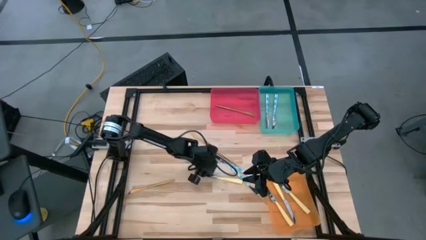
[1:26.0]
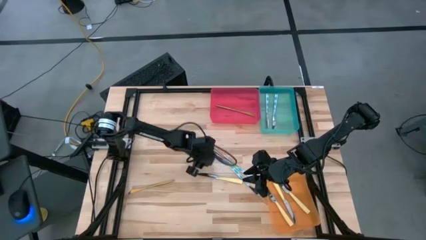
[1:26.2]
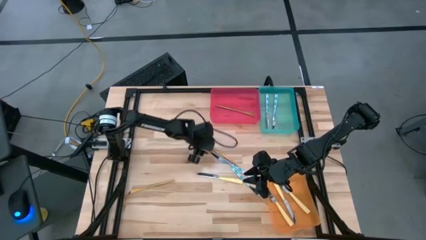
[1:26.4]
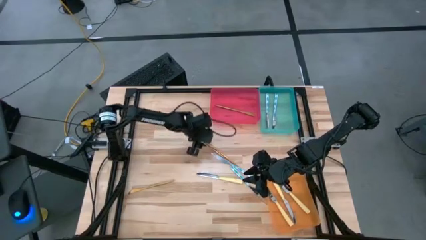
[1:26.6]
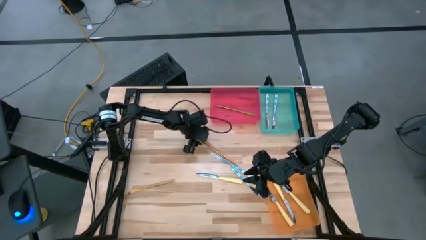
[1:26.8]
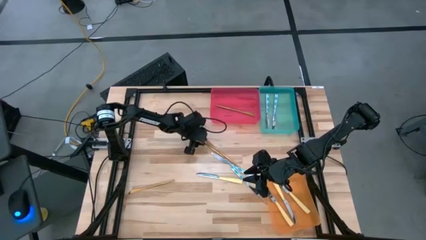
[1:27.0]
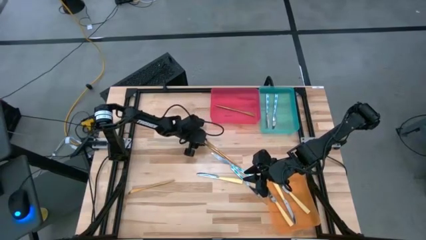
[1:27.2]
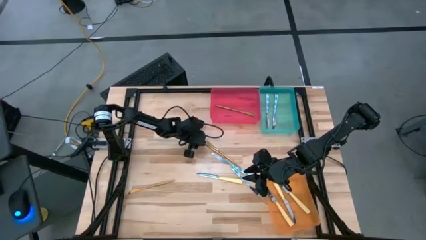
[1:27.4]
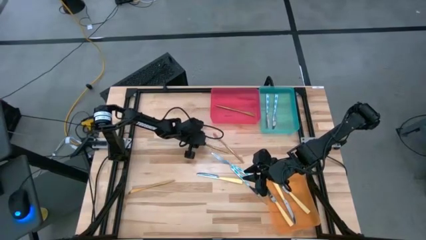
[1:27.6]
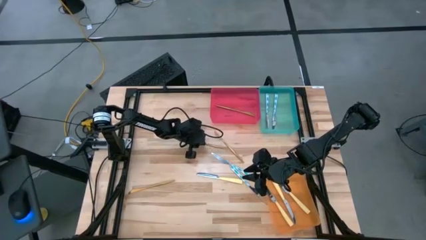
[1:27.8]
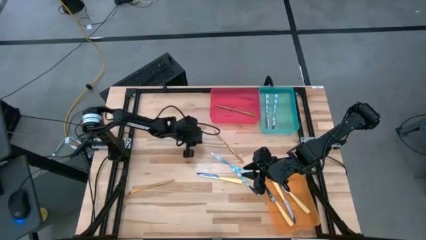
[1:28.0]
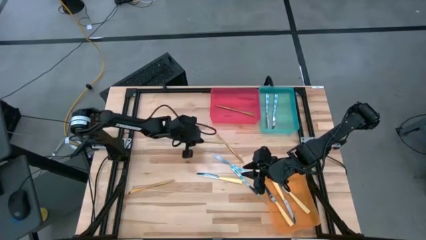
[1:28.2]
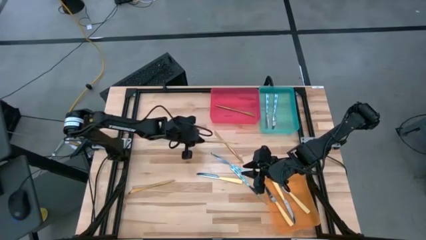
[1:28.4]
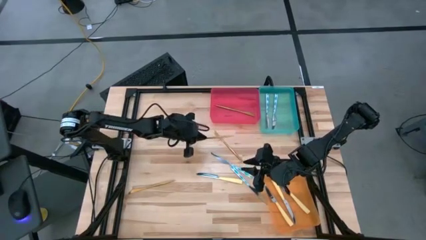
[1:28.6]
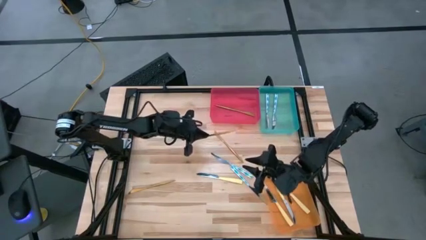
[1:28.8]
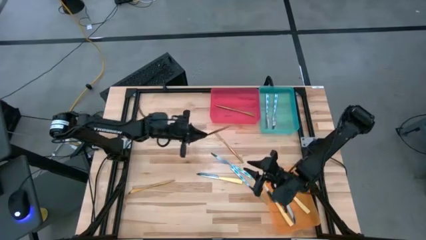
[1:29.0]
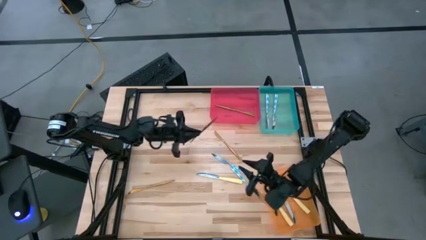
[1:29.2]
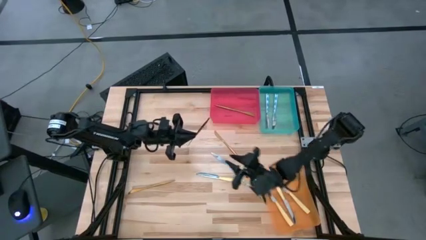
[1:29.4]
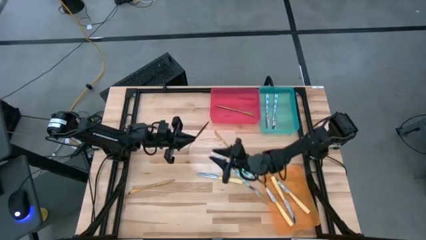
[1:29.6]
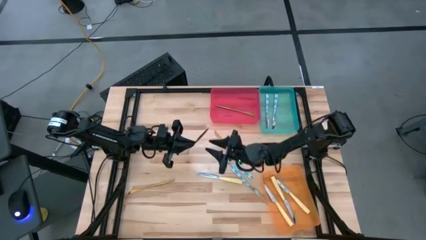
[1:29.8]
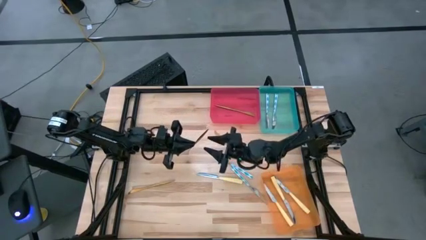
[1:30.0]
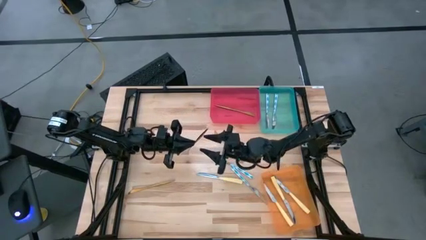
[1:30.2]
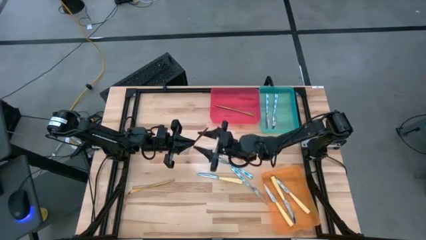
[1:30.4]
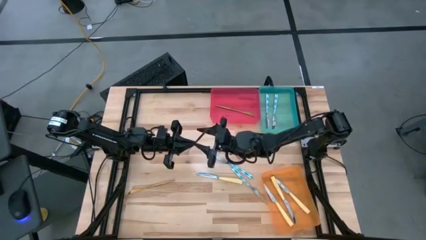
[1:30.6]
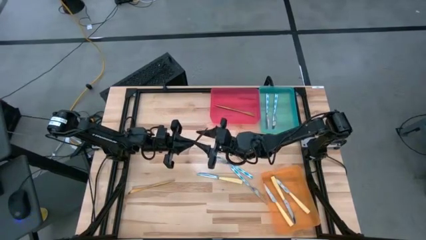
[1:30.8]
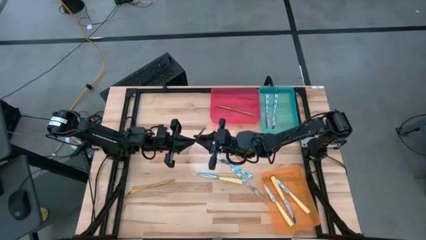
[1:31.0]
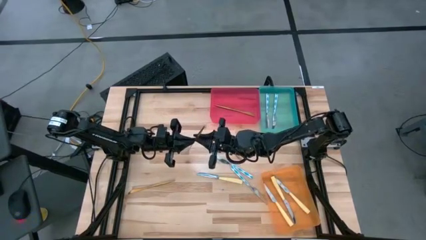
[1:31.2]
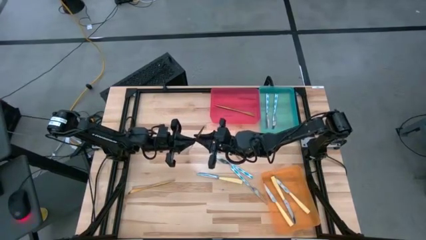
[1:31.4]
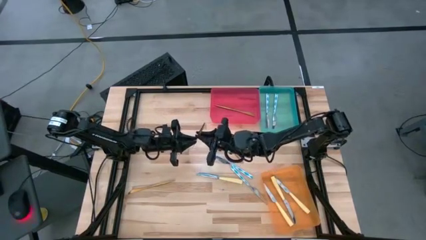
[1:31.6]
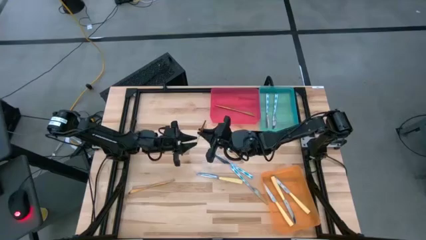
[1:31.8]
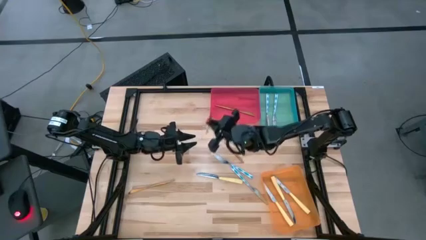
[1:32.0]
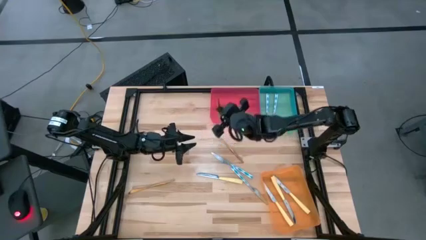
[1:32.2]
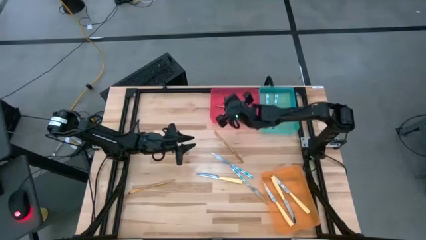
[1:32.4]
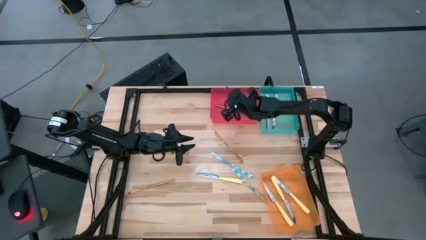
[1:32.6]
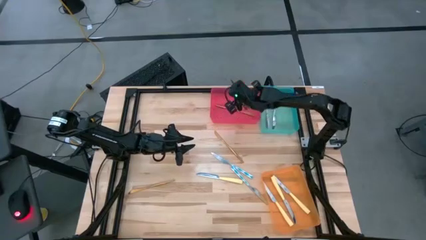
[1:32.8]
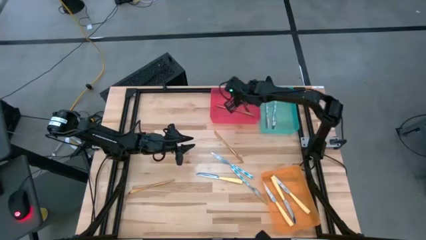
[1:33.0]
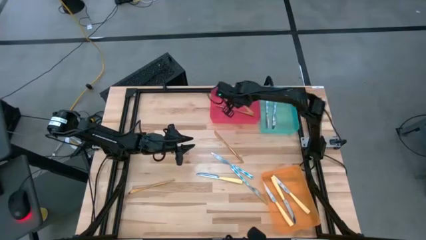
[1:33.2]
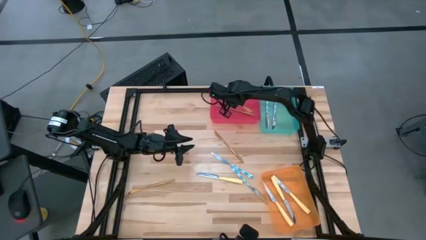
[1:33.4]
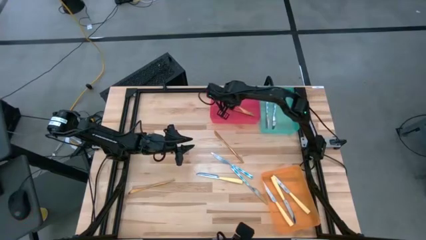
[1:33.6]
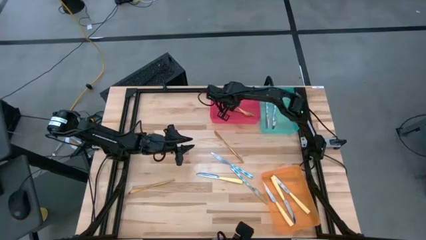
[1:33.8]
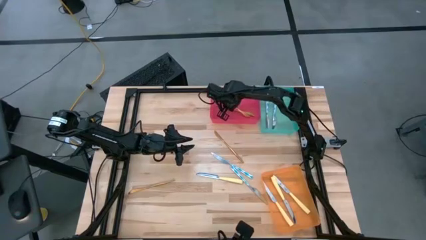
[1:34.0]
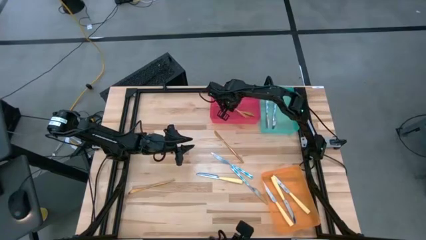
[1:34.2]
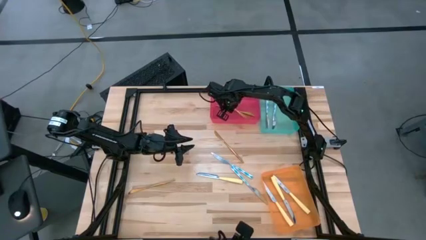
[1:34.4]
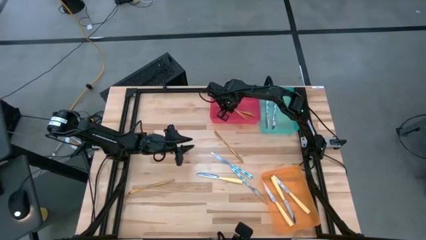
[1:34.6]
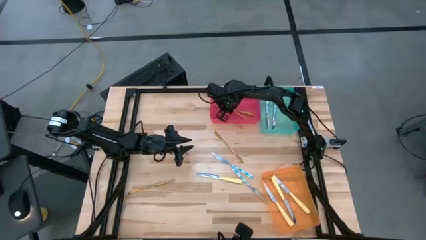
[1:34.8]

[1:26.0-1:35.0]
Task: Sort silverware by color (type)
Put the golden knife into the red bin

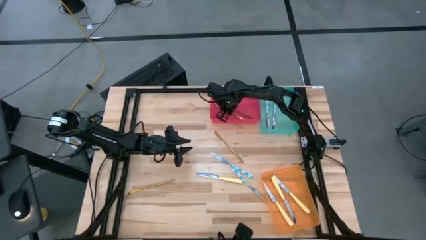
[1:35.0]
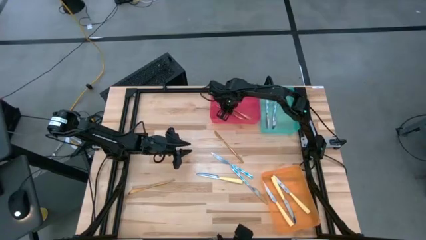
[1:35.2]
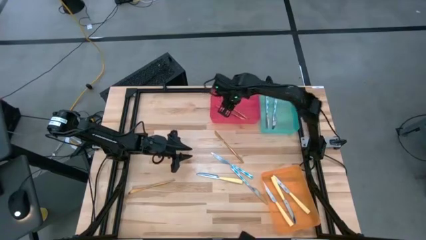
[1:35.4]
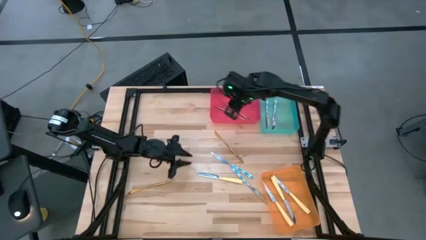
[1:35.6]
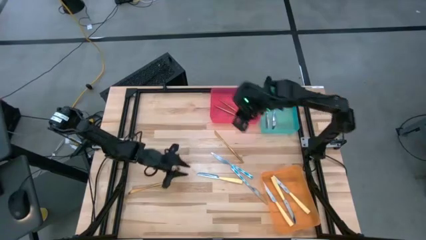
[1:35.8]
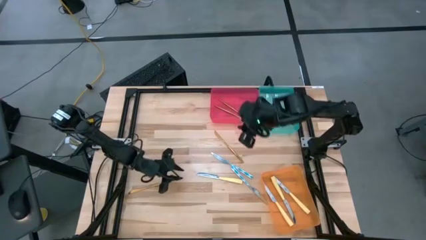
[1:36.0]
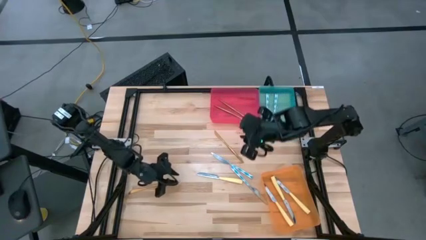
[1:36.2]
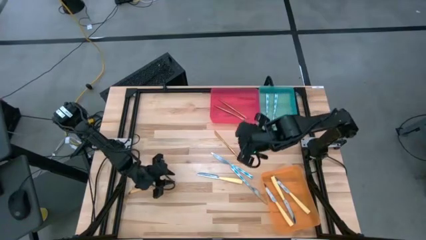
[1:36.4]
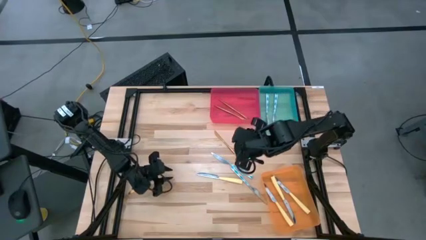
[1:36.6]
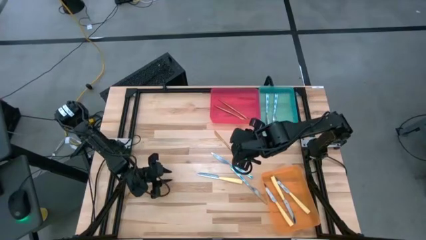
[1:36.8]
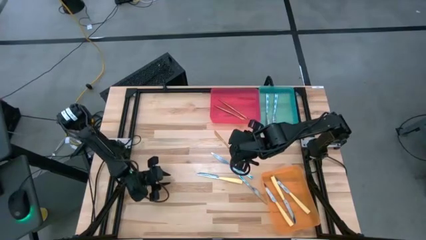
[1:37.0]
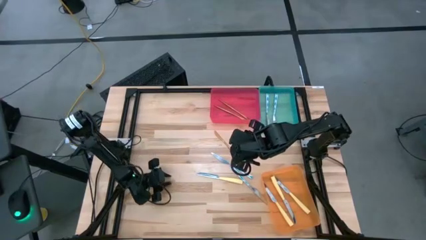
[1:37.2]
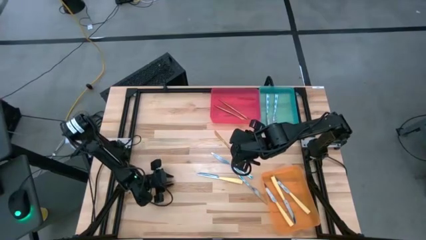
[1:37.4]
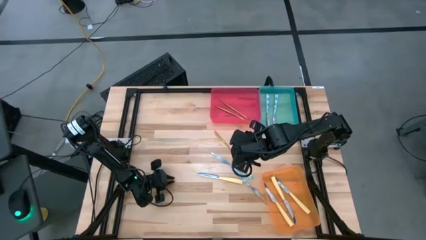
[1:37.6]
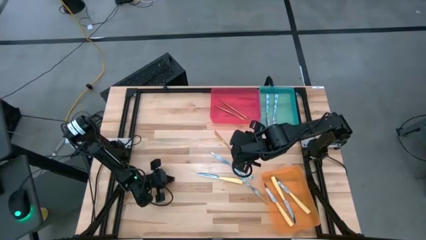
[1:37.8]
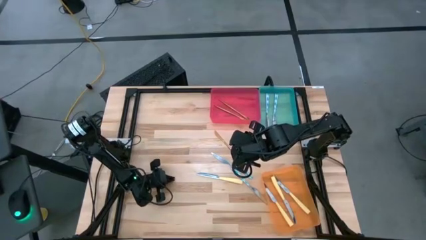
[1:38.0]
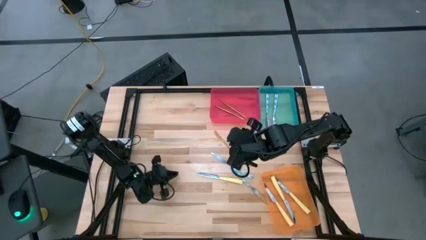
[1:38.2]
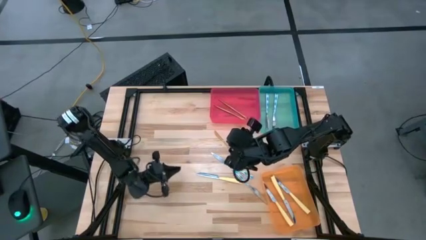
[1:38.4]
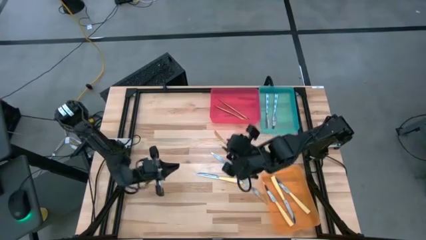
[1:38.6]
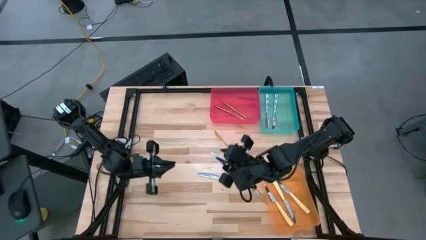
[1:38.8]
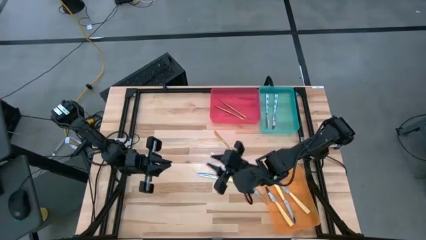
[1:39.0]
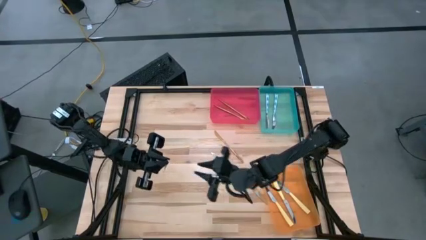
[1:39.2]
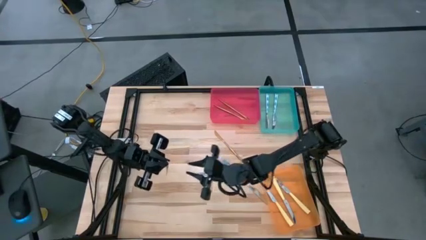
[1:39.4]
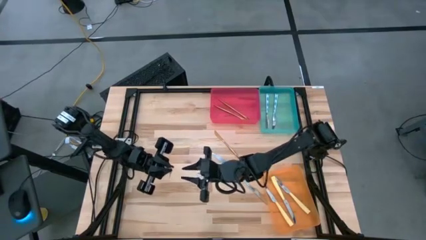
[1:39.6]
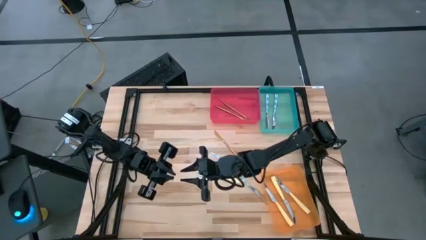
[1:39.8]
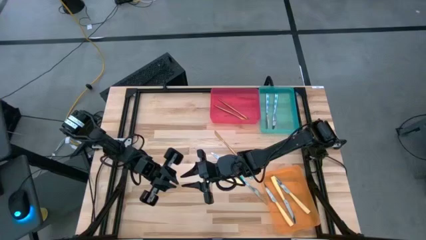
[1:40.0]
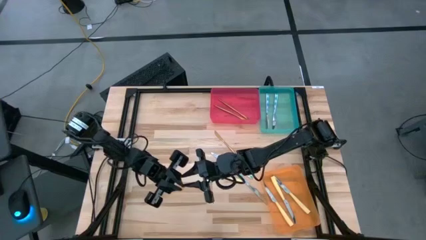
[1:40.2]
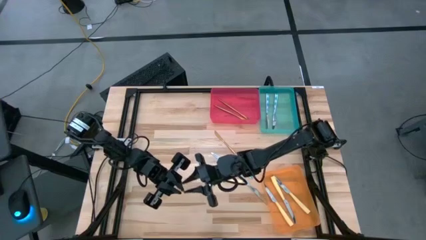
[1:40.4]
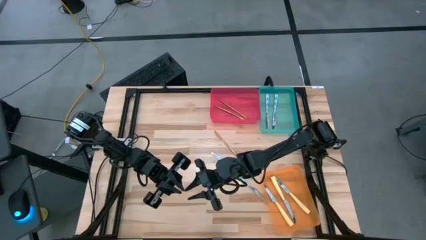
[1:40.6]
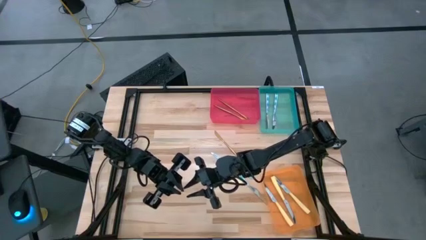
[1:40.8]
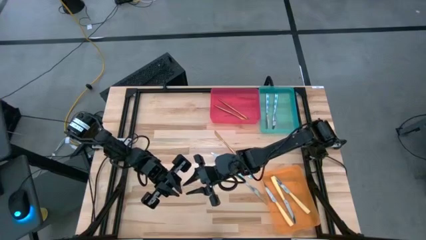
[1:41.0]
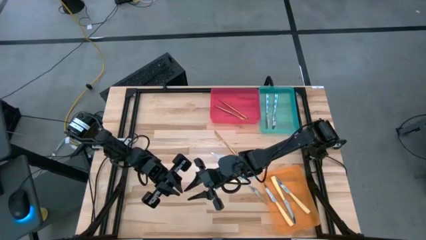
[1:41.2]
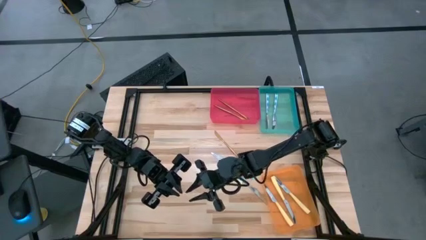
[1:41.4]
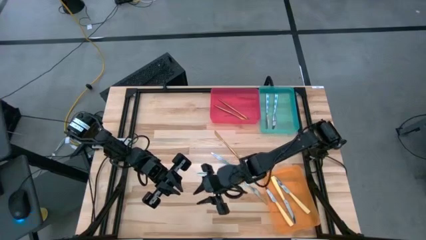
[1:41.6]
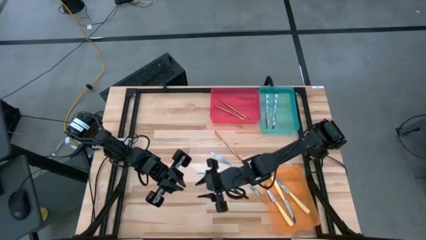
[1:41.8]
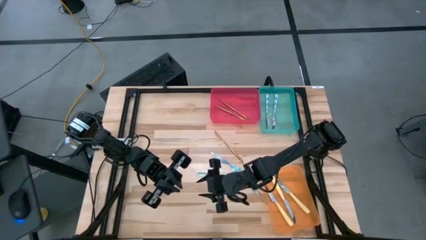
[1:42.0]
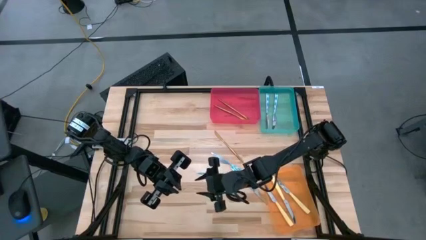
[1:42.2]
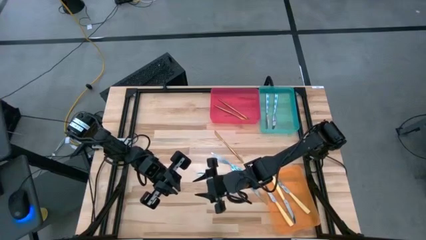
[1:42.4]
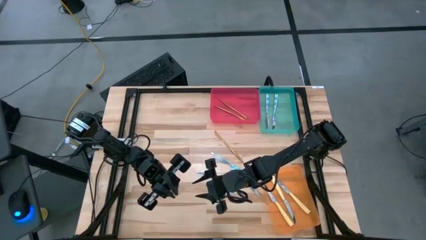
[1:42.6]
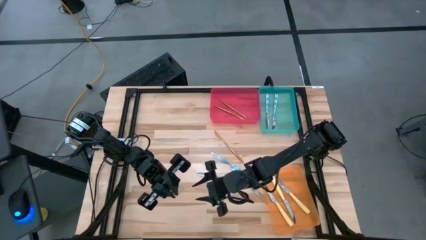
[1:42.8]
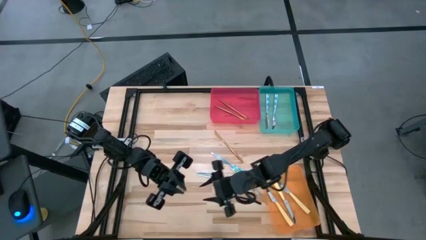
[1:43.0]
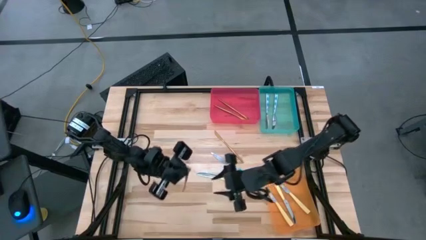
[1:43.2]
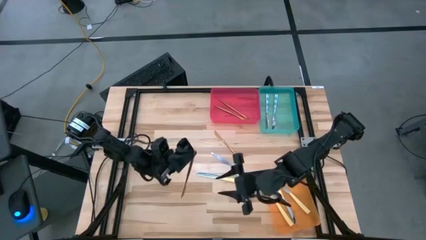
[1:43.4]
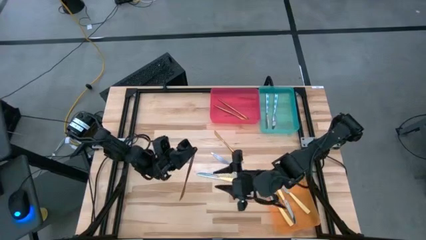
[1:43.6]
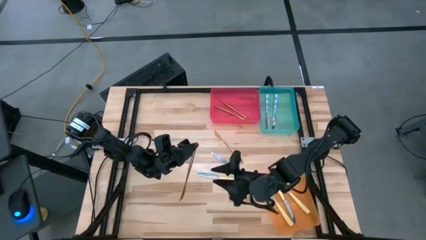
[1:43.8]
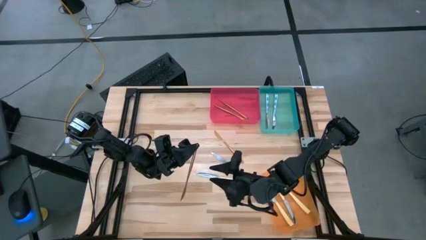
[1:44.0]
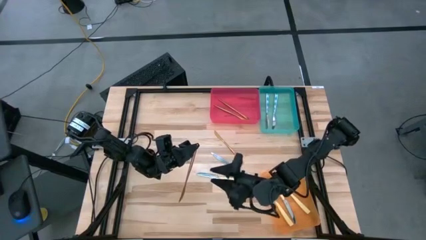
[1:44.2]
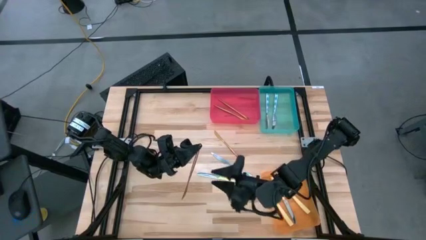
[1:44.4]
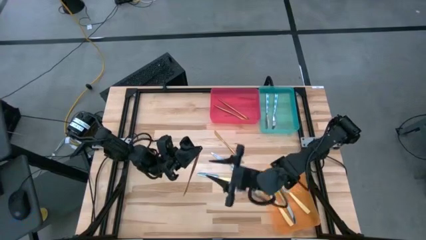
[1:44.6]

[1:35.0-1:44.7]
Put the golden knife into the red bin
